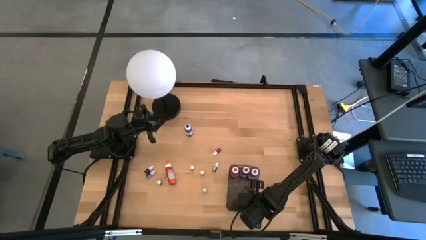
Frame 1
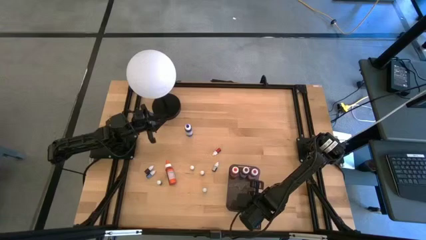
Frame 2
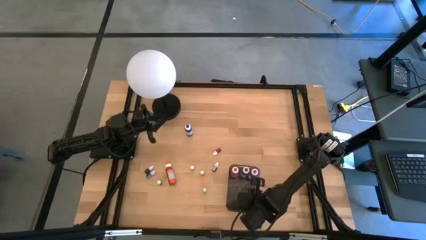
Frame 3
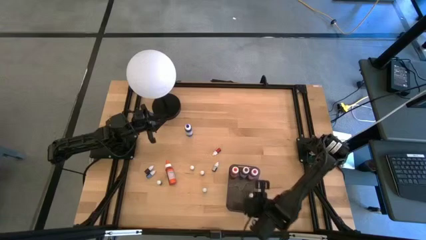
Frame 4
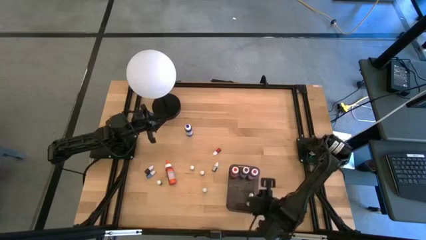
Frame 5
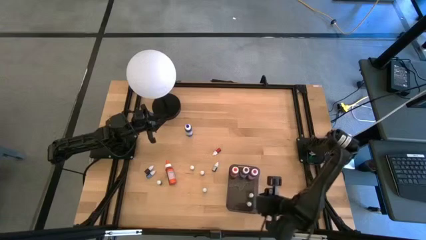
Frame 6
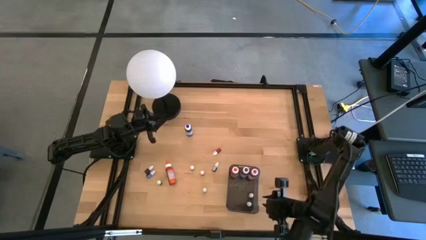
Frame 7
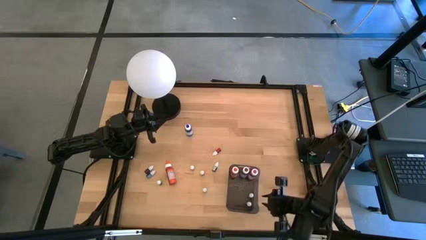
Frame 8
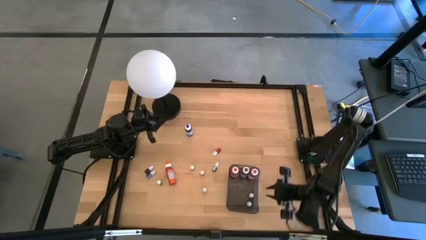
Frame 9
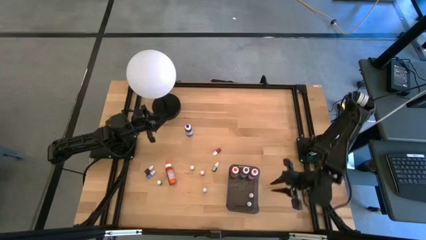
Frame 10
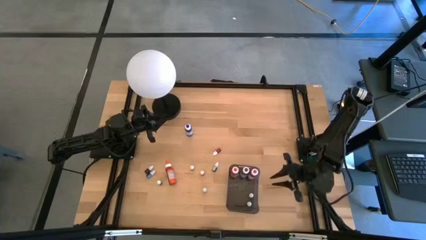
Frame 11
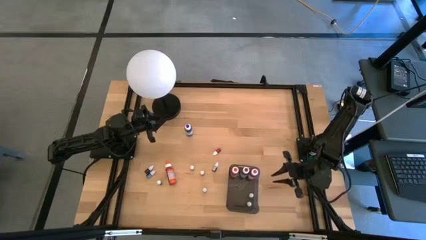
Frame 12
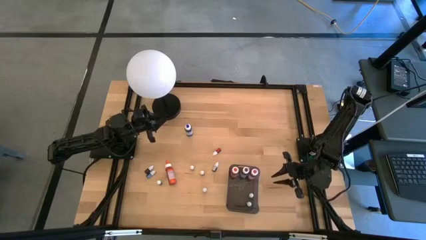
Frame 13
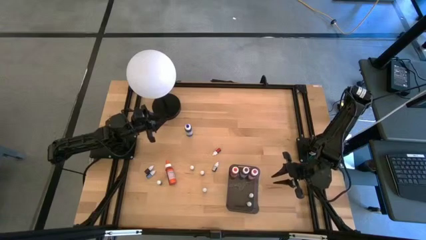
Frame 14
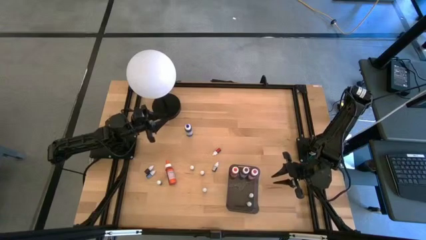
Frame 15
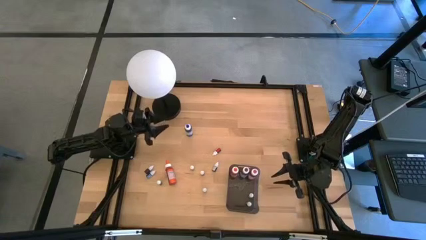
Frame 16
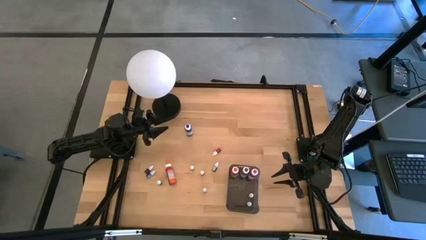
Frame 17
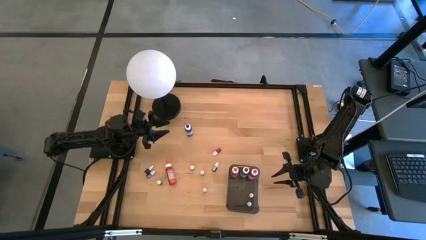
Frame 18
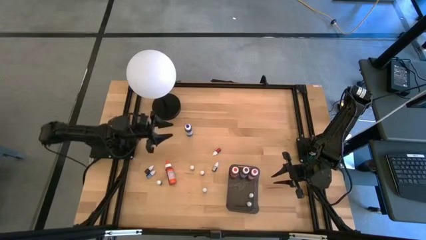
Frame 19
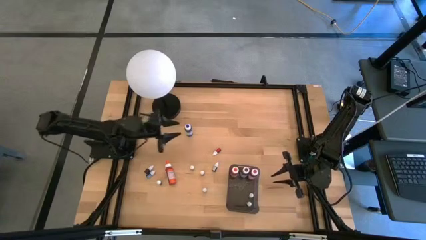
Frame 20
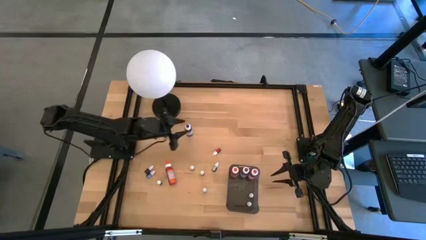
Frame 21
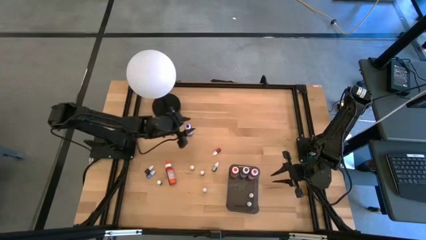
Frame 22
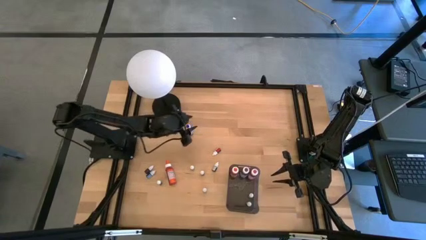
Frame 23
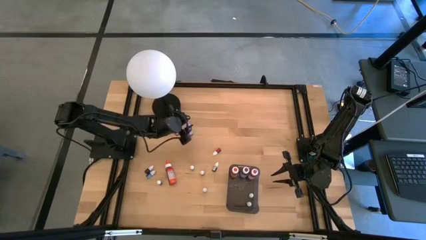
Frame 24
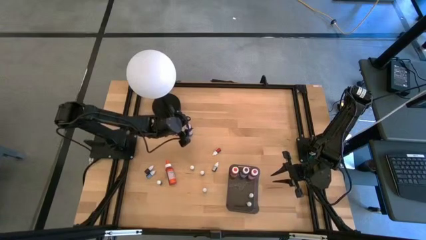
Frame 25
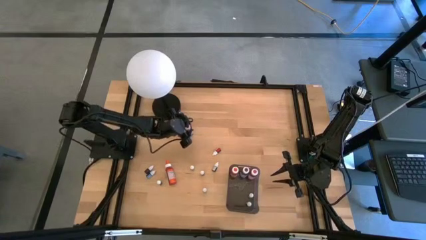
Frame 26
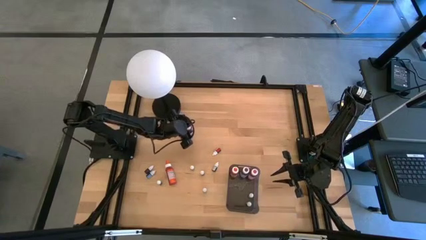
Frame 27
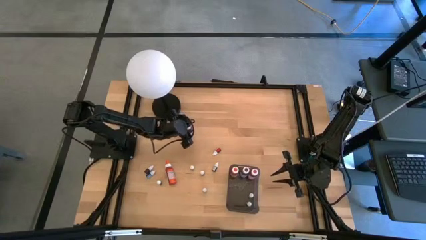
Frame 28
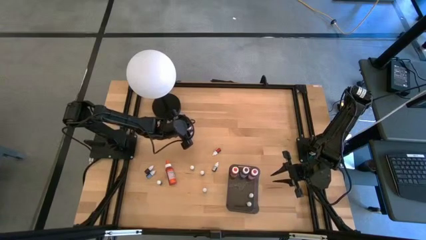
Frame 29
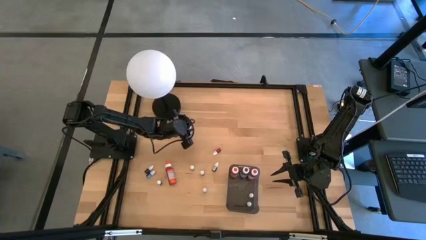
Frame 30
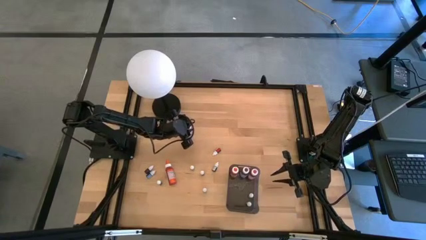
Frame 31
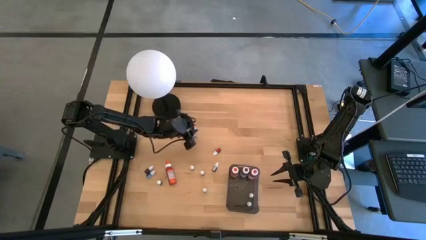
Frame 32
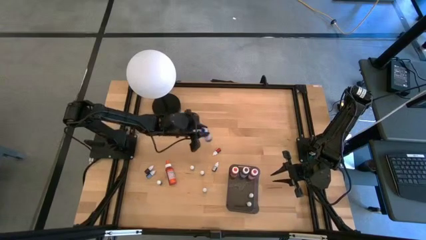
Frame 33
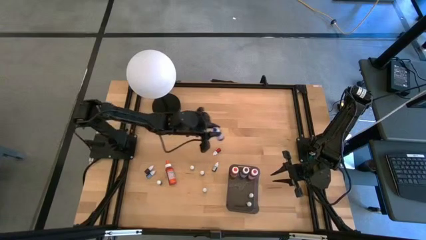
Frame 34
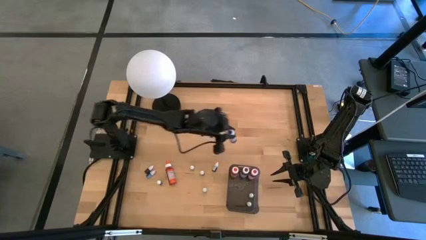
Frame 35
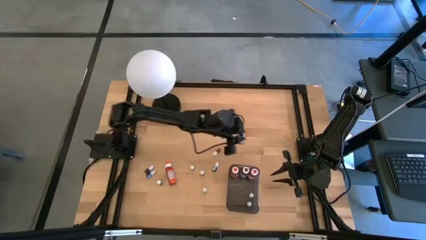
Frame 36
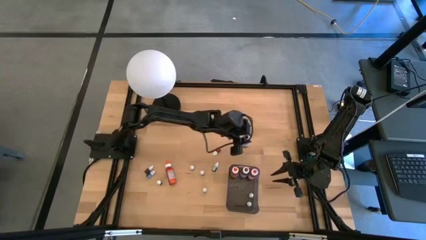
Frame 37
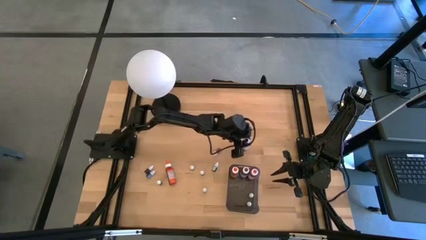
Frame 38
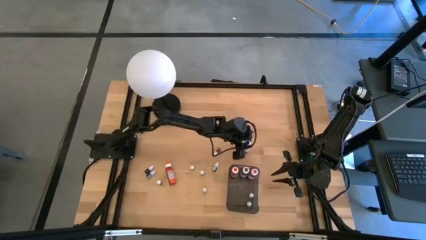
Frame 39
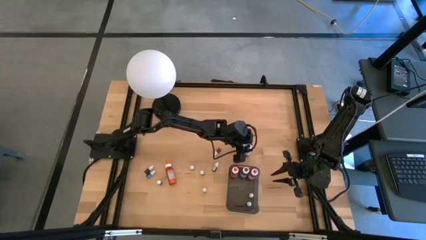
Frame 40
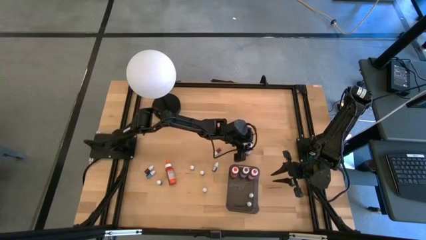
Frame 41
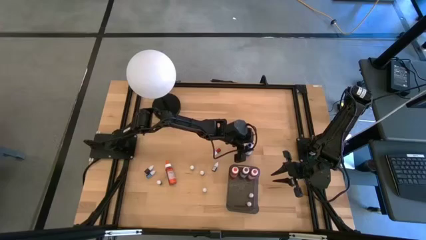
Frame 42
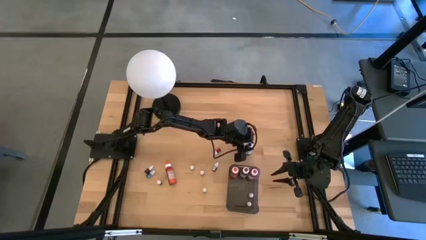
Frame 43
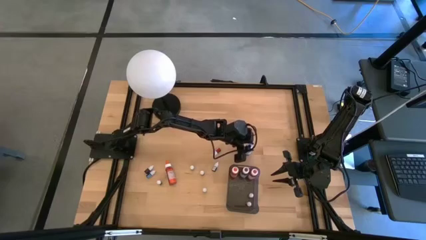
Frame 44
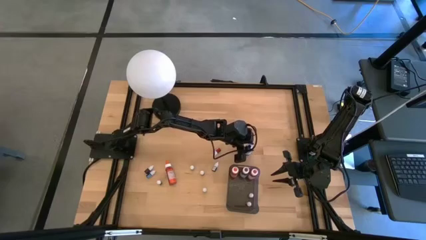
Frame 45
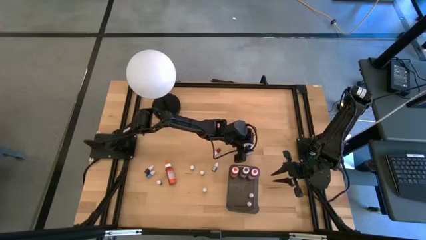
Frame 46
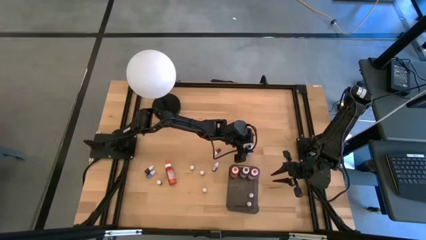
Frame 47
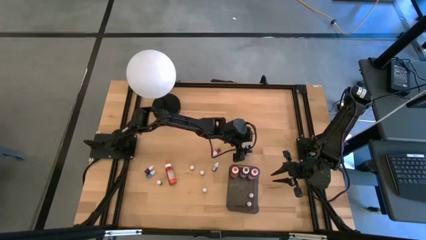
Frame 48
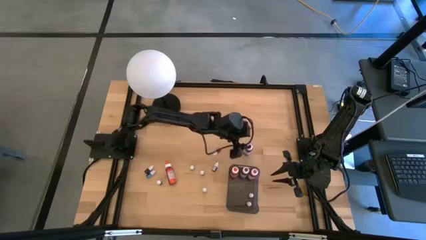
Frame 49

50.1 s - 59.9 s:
Task: Pick & Place food coloring
Put the large blue food coloring bottle into the black bin

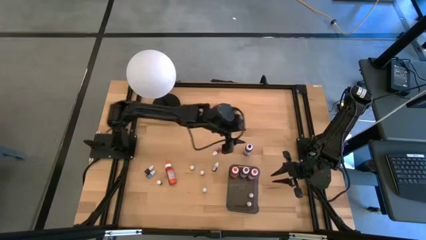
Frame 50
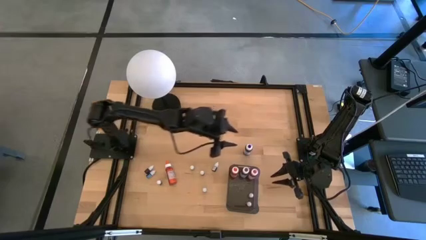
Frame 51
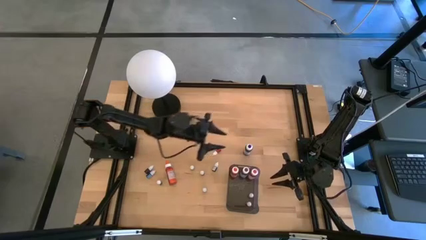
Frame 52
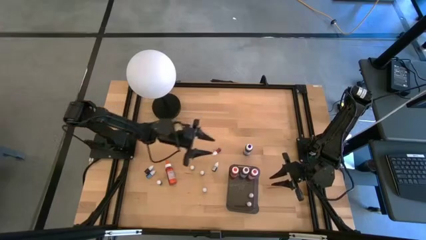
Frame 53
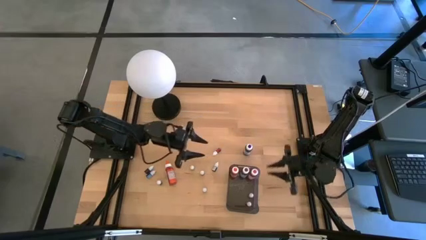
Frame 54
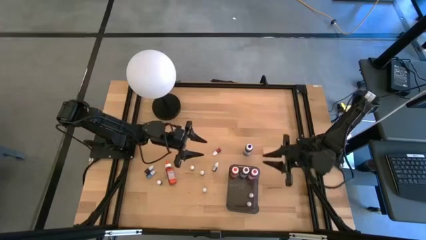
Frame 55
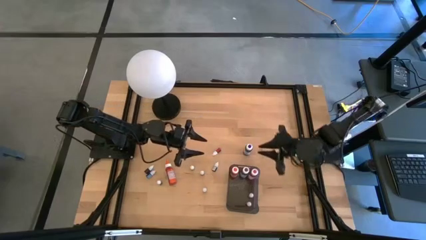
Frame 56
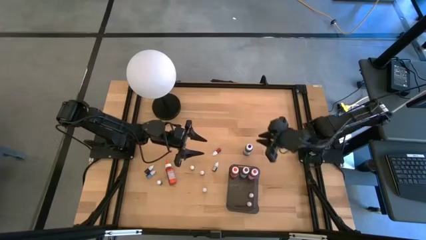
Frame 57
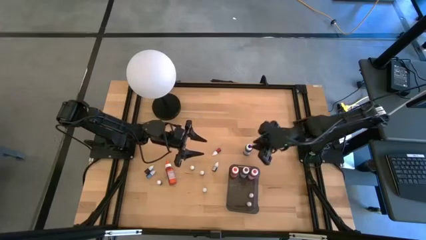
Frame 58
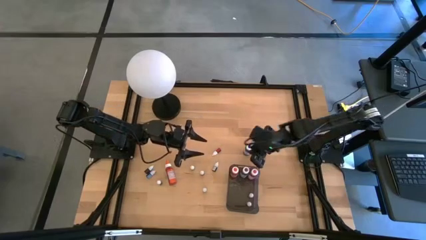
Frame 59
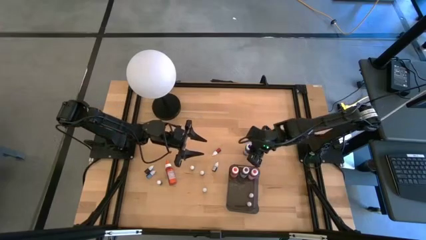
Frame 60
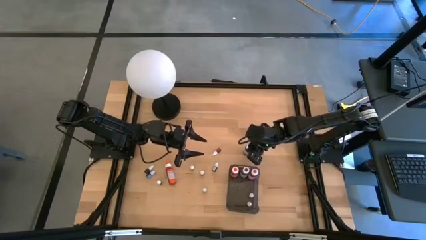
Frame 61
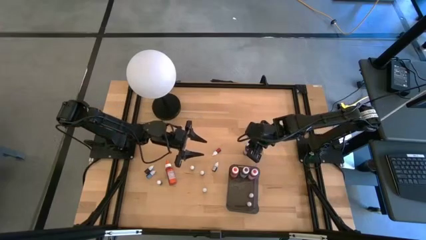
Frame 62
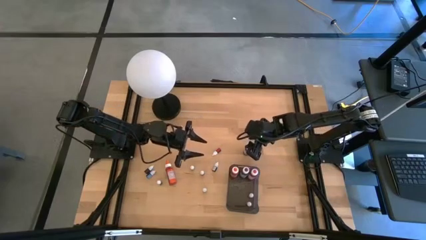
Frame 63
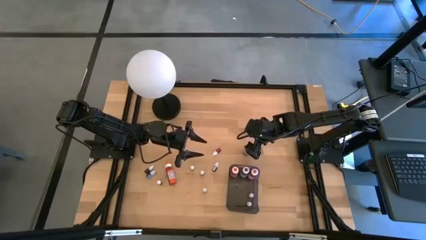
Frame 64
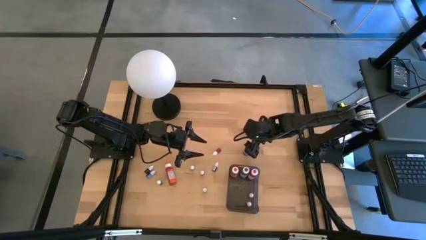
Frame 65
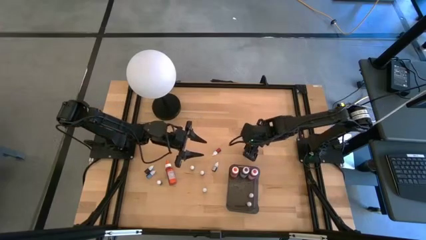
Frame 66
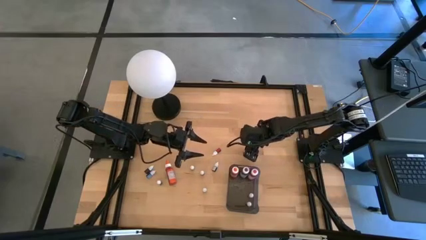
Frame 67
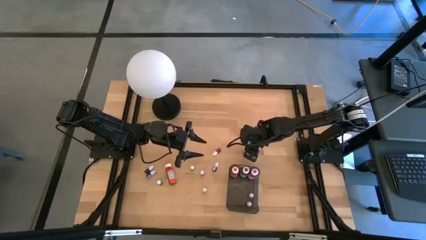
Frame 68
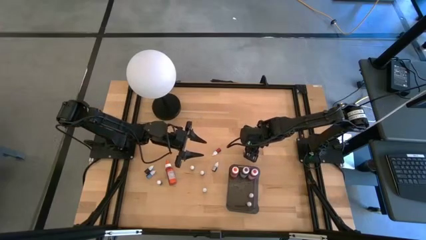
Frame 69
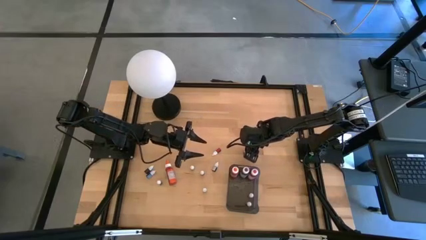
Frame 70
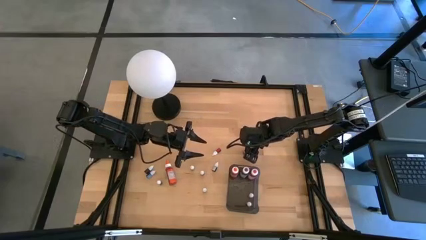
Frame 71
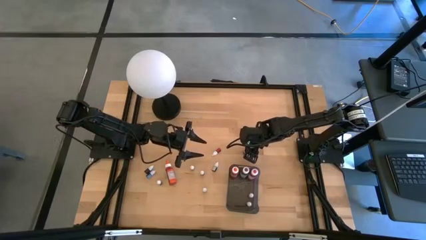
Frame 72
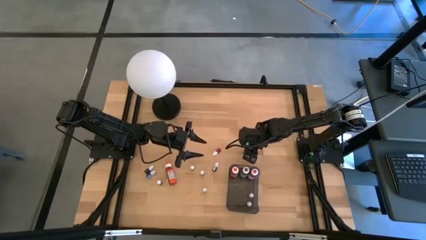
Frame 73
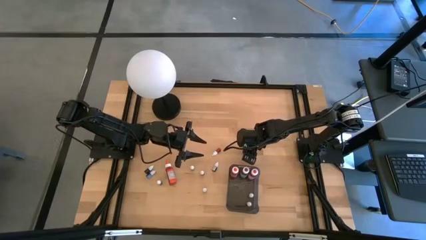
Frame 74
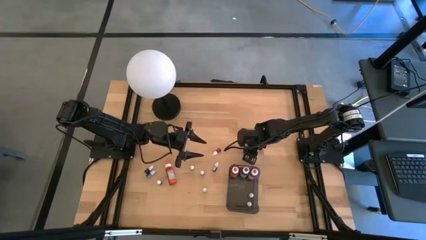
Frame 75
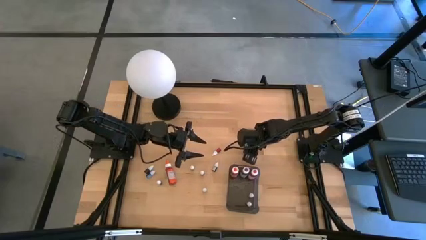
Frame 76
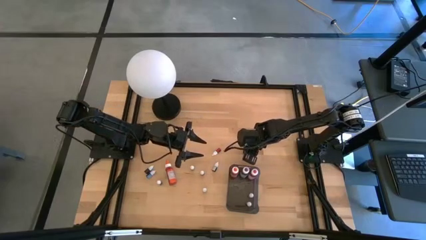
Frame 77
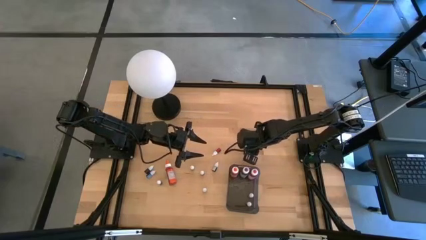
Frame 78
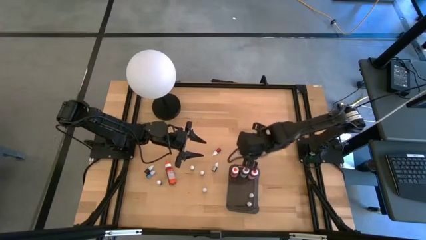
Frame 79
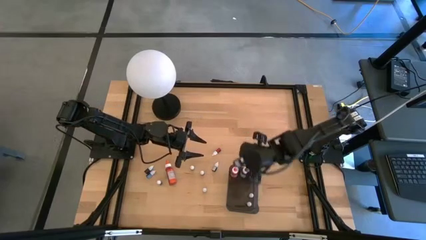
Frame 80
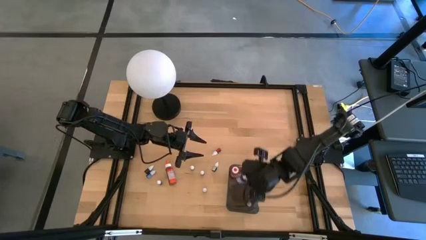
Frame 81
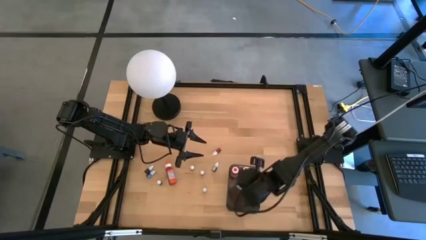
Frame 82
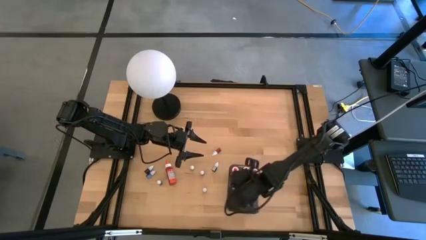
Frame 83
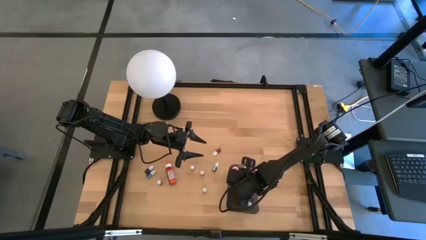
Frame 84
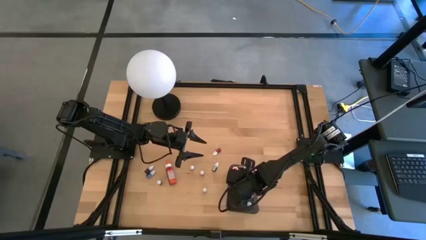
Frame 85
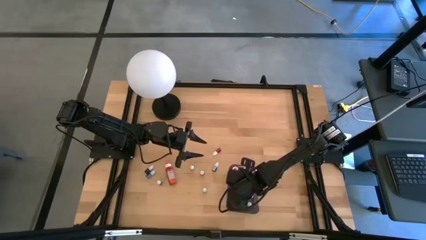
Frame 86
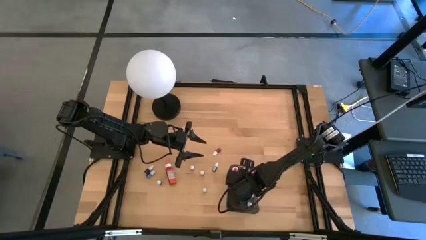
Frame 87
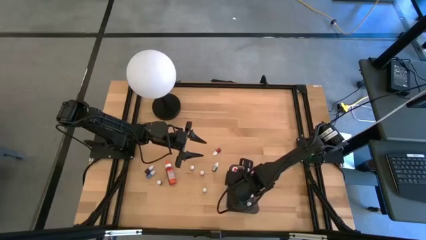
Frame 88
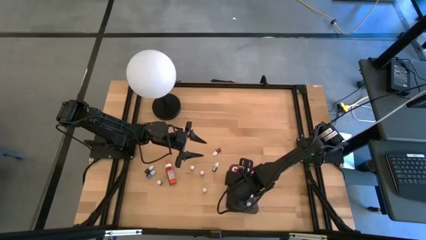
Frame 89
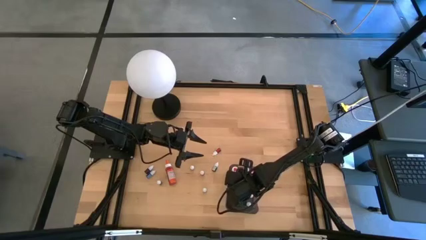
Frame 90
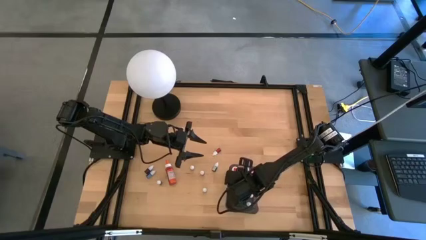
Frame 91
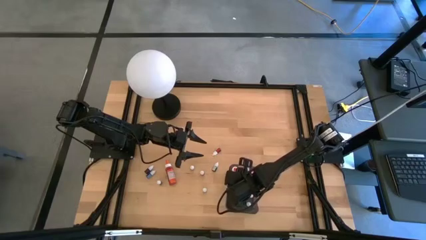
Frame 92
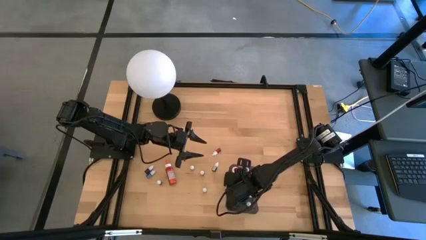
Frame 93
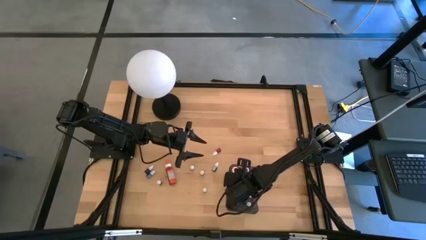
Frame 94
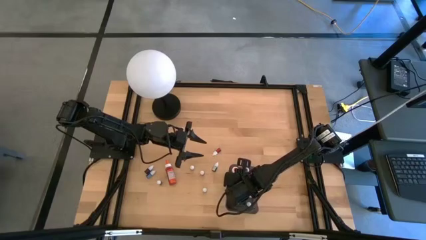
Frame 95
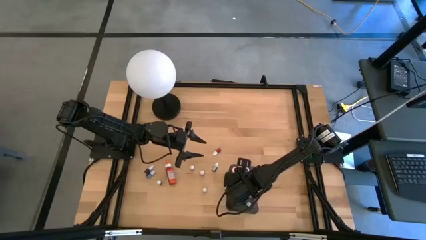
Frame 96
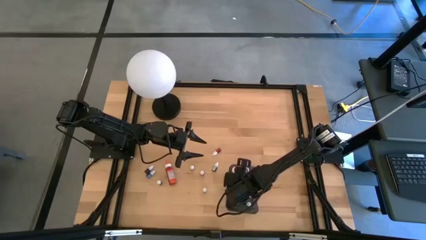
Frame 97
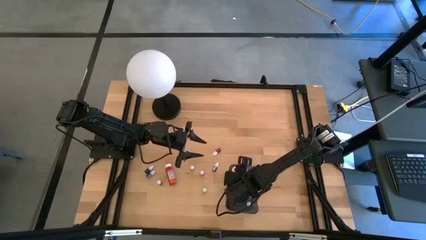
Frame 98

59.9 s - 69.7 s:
Put the large blue food coloring bottle into the black bin
